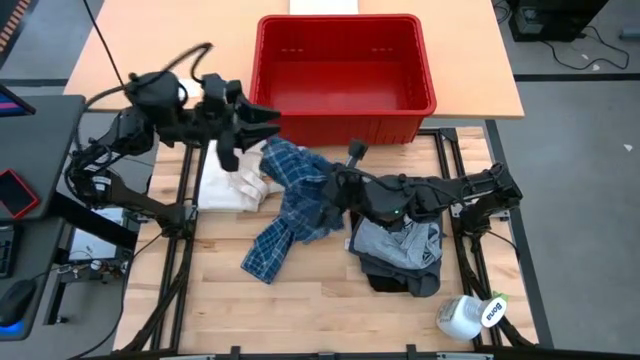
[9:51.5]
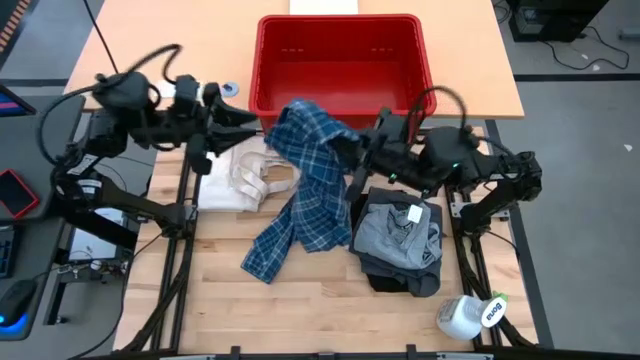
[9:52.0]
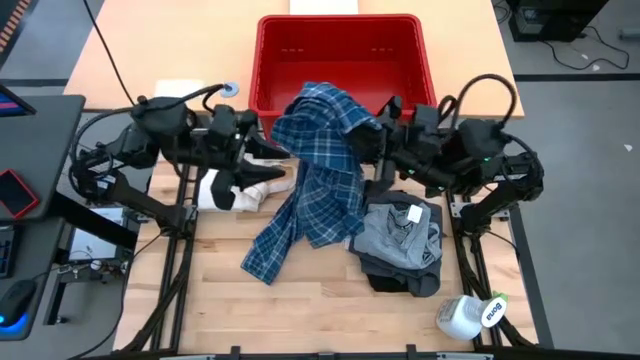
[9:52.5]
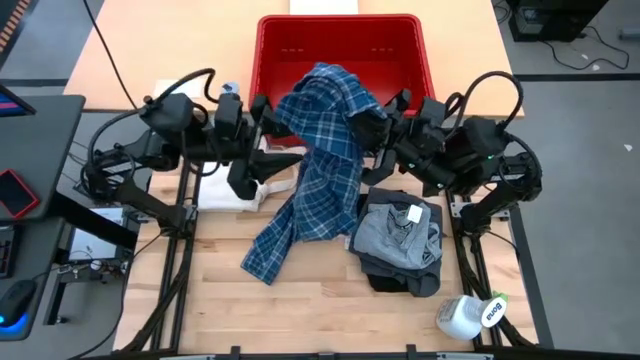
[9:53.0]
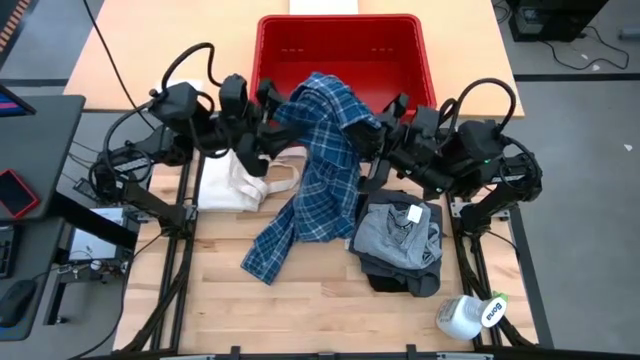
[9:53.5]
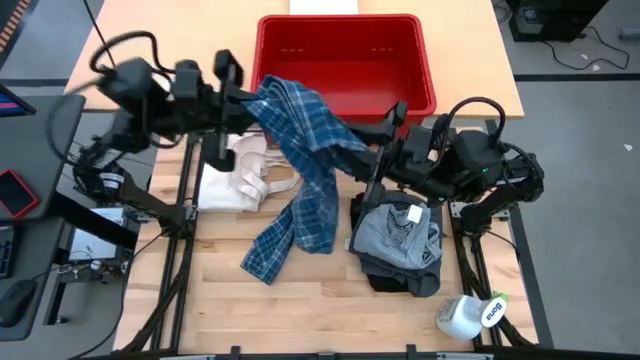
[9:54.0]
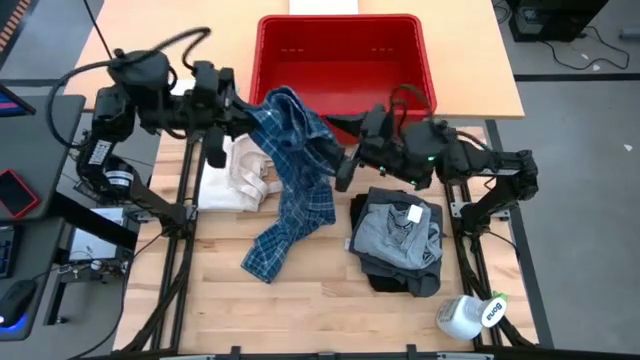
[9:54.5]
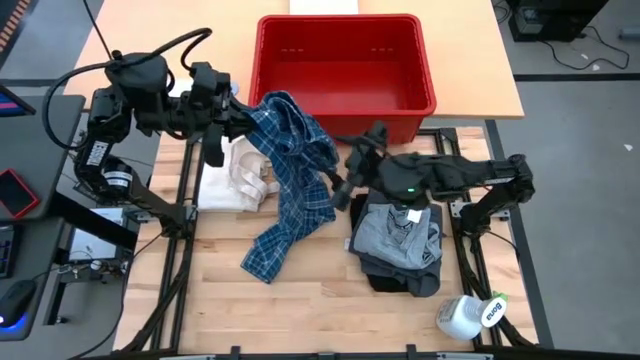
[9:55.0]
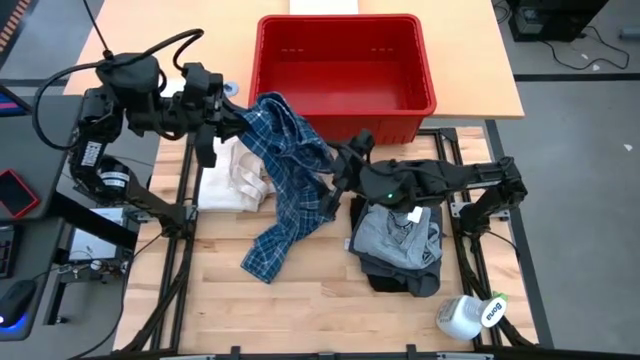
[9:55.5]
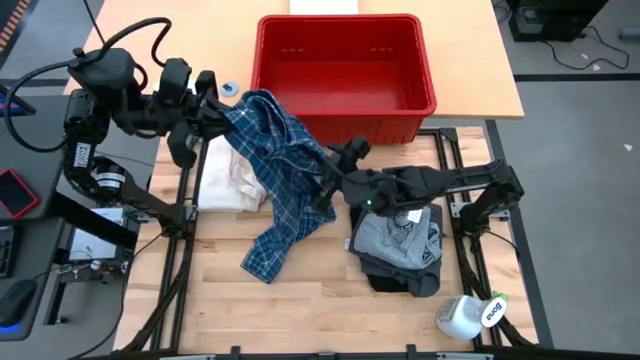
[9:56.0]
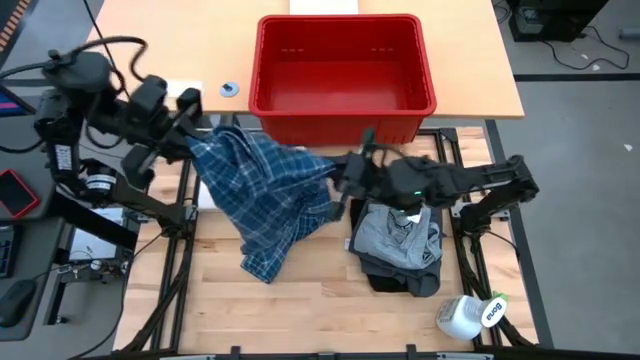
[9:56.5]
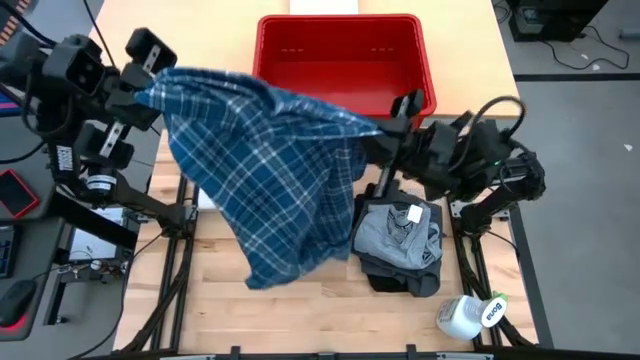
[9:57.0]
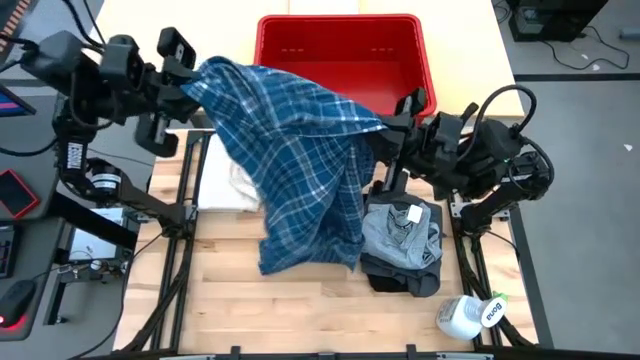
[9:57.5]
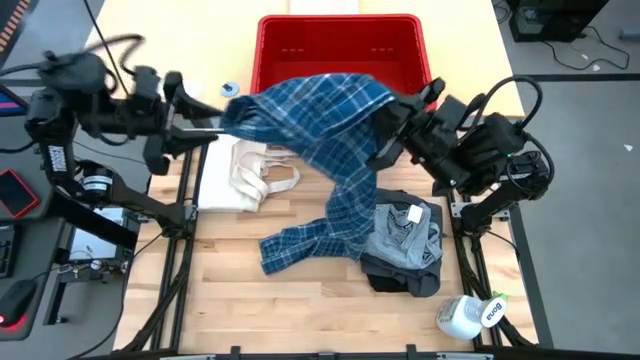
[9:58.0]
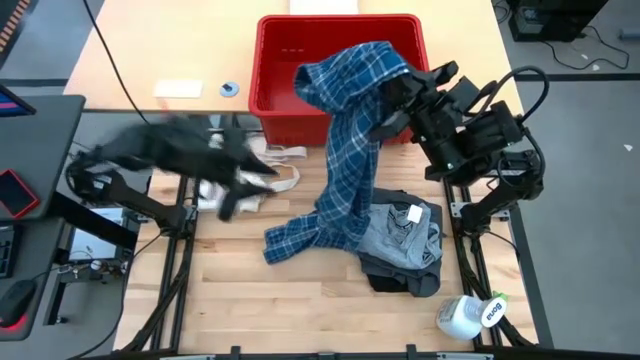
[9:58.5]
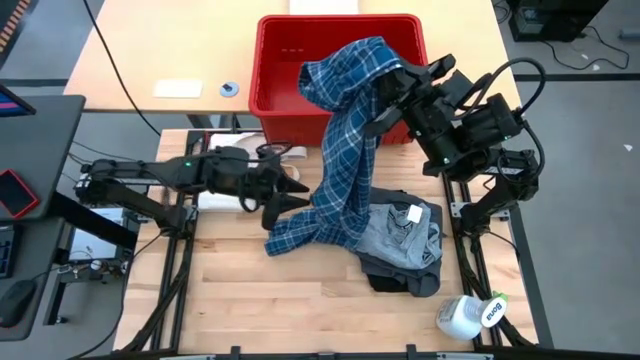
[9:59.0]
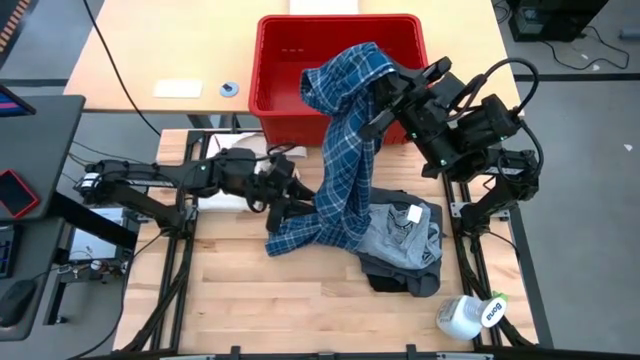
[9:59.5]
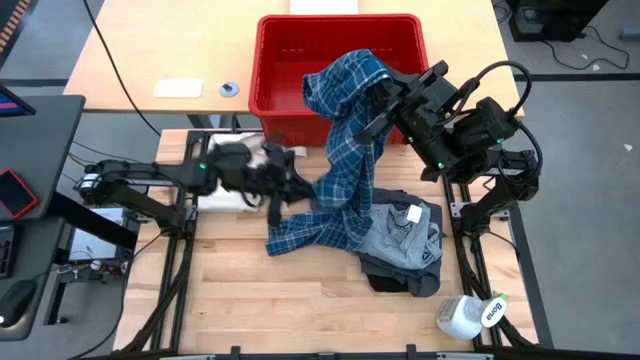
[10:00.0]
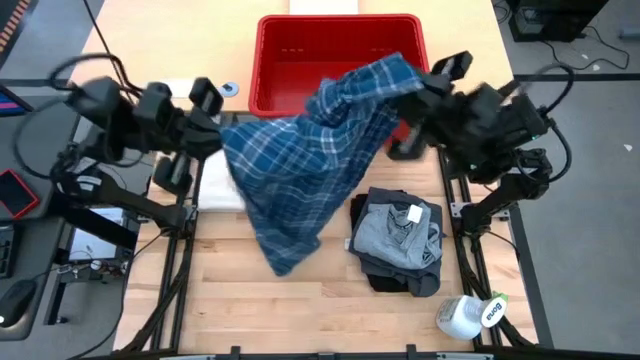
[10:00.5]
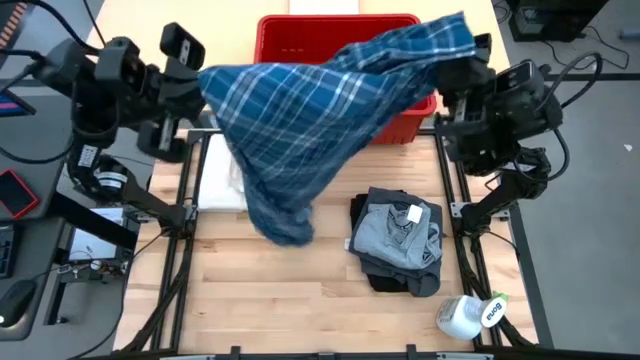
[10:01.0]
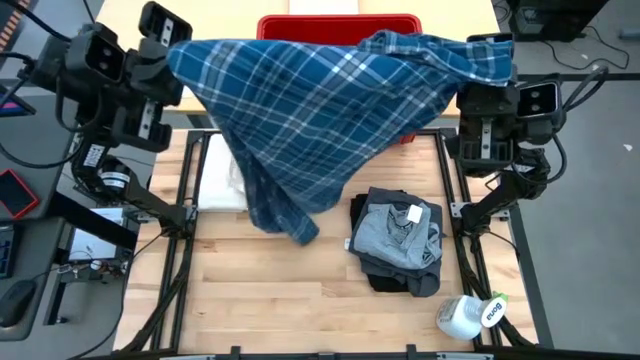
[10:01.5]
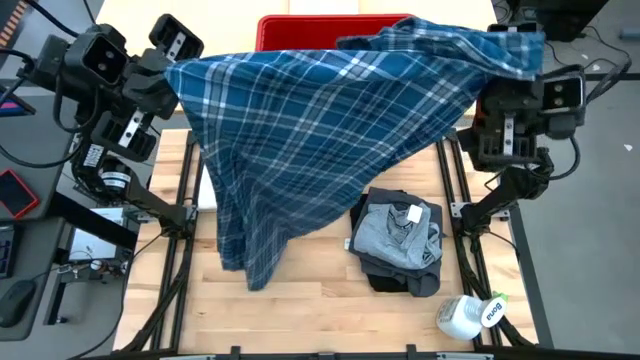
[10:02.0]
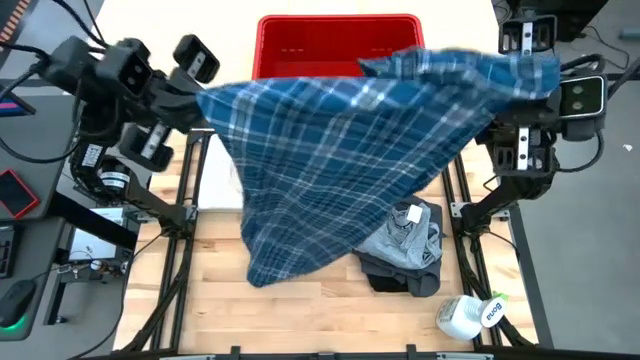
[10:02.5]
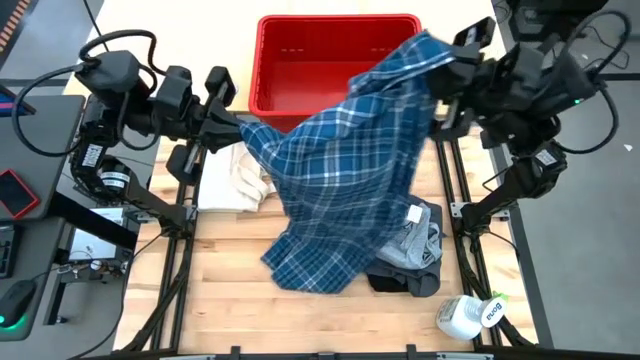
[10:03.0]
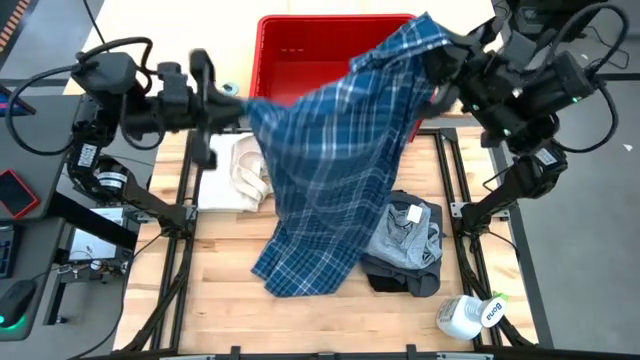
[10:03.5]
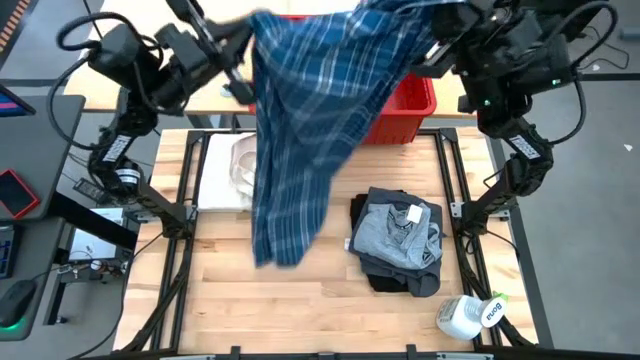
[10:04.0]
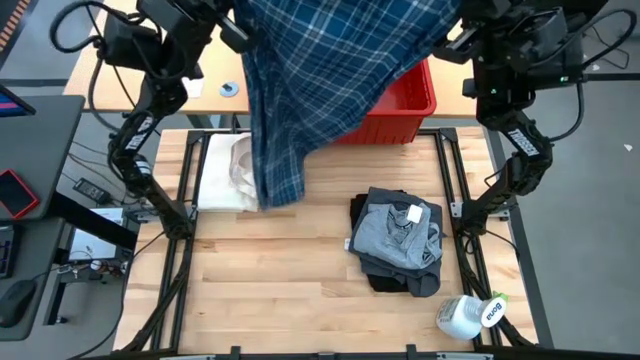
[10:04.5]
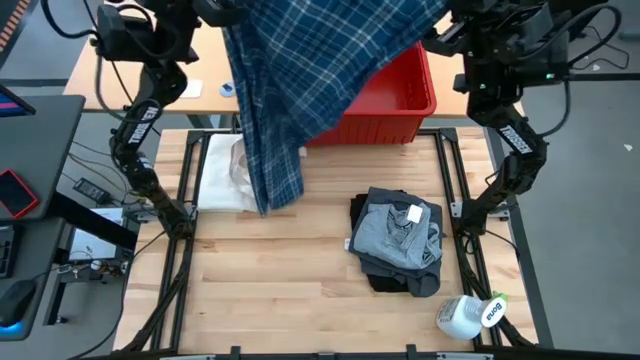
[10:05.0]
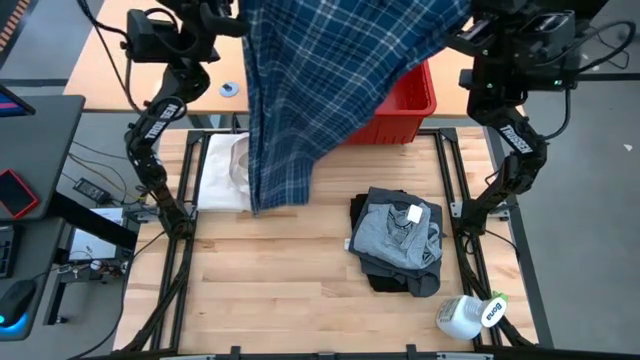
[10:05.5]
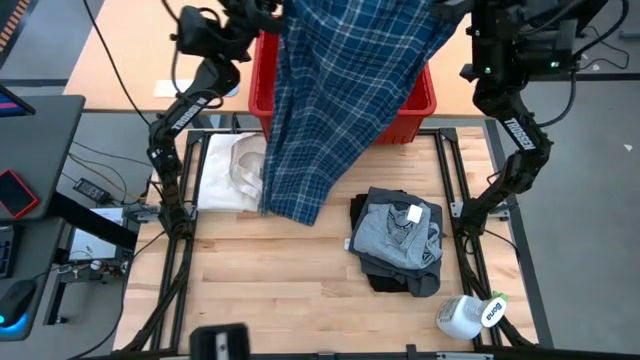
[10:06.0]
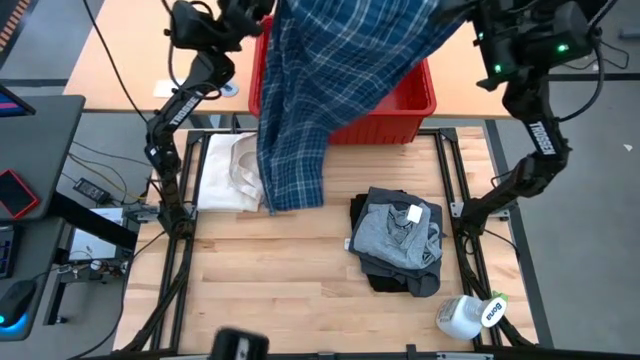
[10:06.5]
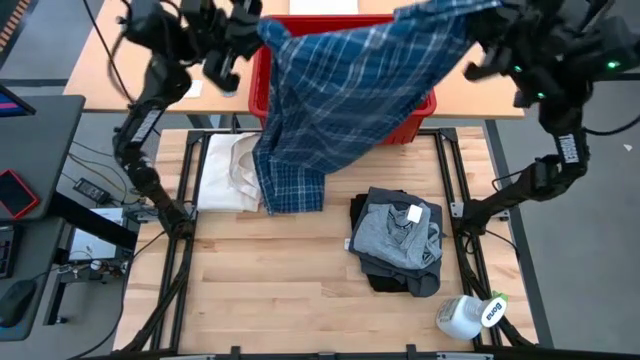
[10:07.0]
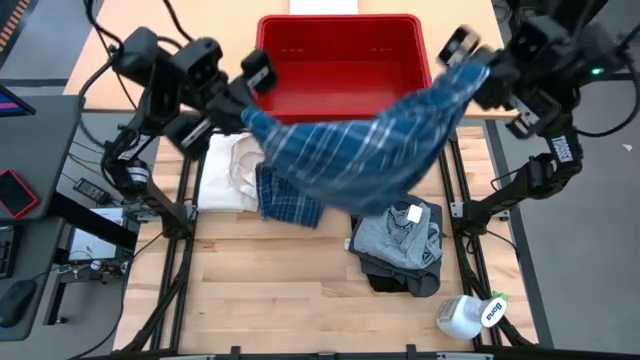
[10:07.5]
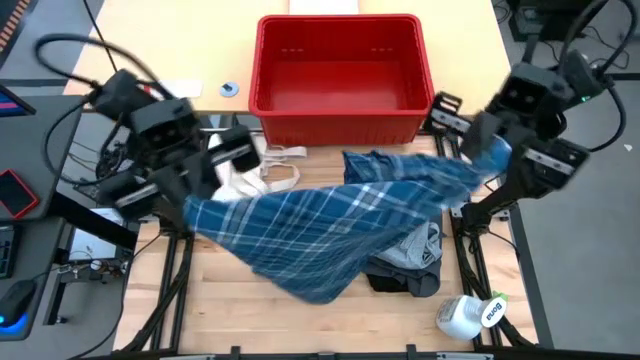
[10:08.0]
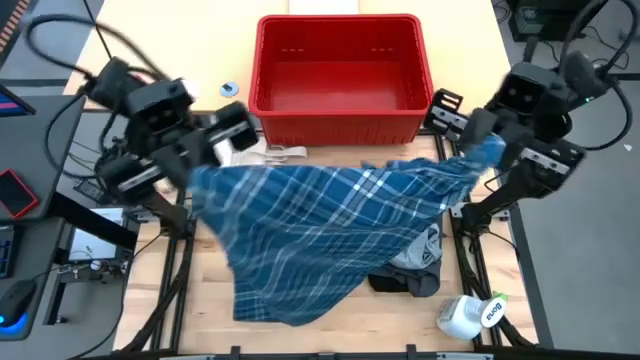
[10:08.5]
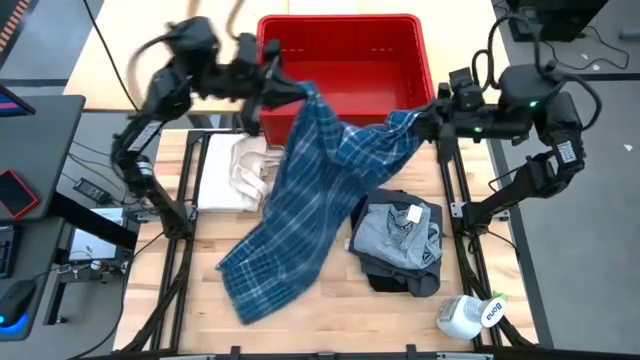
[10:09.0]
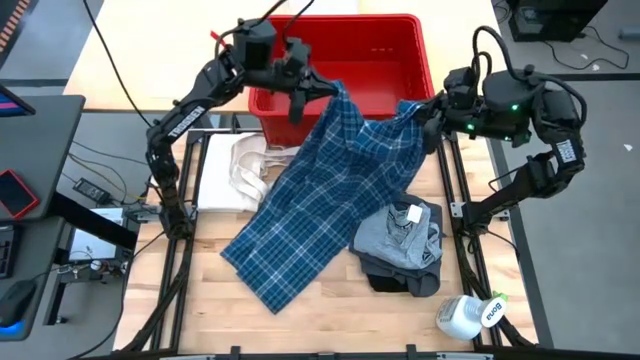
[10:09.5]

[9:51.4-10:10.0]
Task: Fold Laundry from Bin
Fold the blue checkered pants

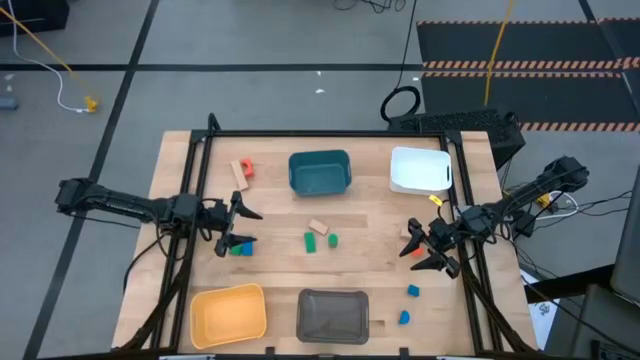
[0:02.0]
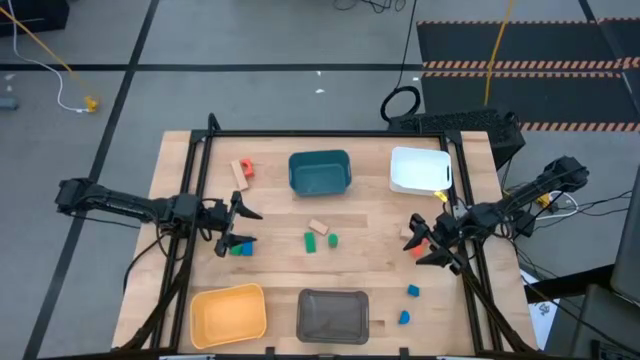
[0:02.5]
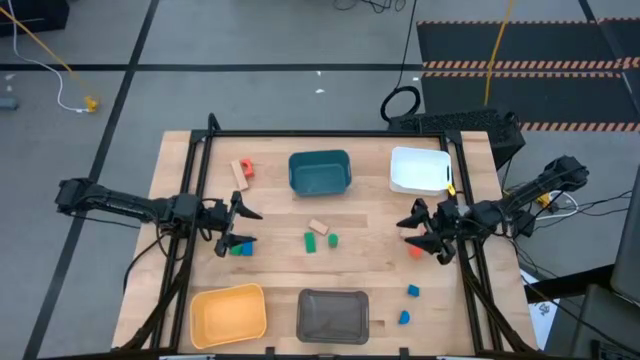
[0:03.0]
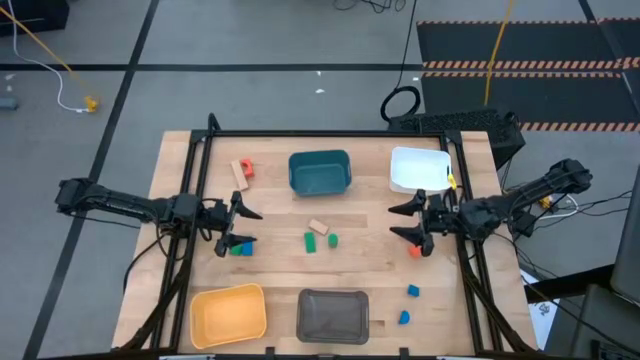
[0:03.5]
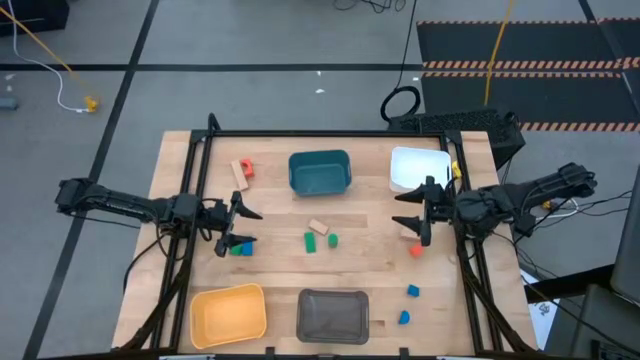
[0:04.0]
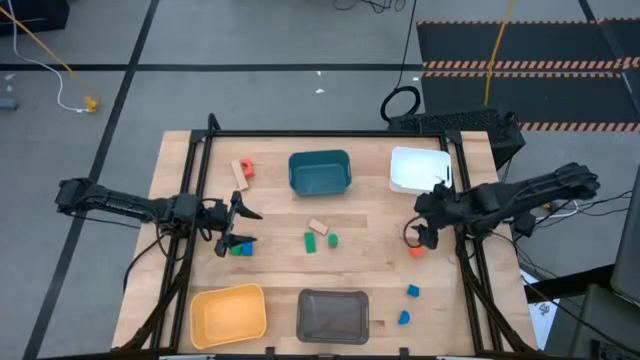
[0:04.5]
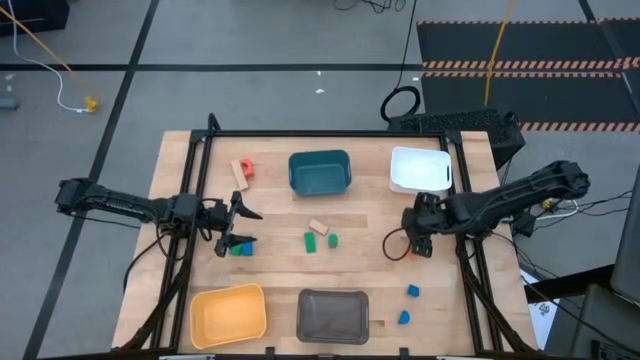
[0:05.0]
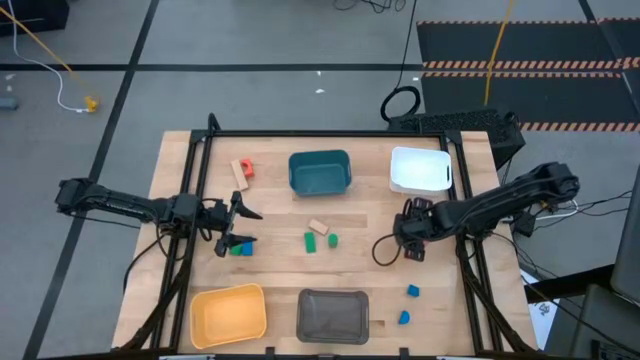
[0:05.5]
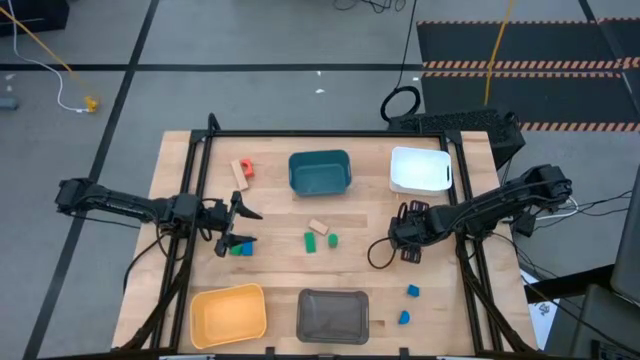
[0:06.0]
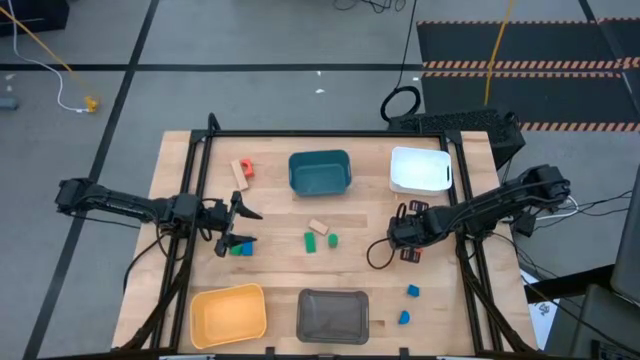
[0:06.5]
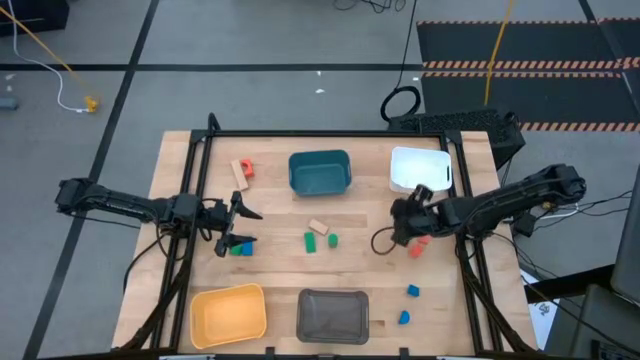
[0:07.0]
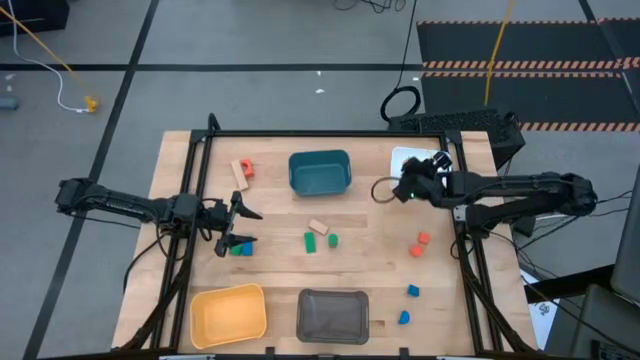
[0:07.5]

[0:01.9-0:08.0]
Task: Sort & place blocks by color
Put the bottom right brown block into the white bin
